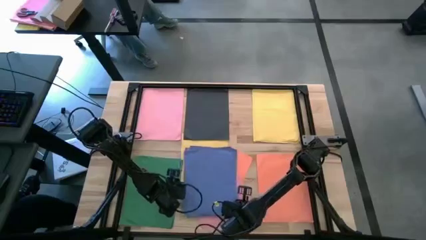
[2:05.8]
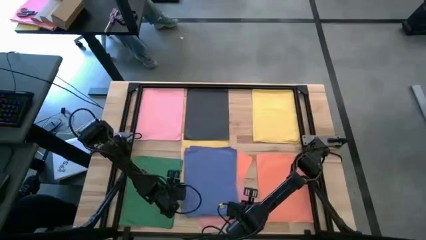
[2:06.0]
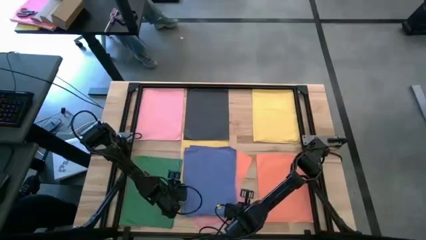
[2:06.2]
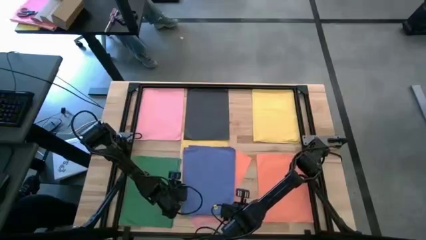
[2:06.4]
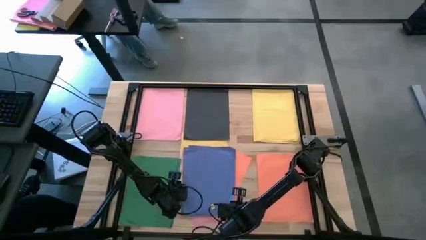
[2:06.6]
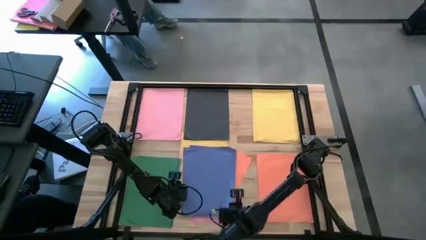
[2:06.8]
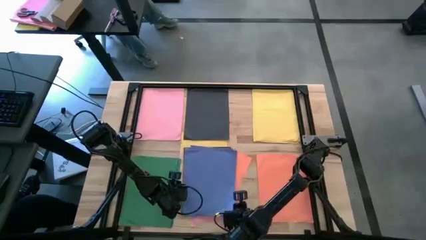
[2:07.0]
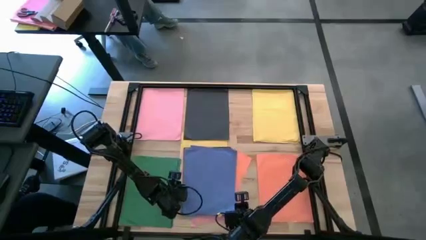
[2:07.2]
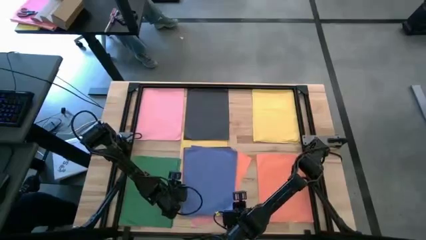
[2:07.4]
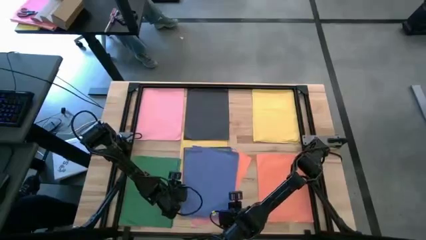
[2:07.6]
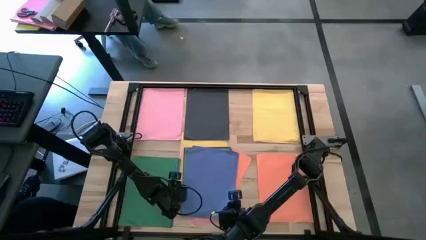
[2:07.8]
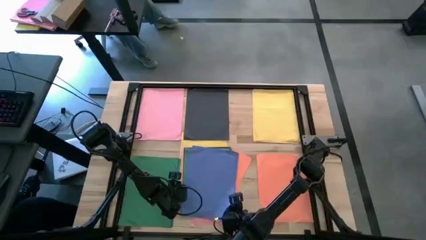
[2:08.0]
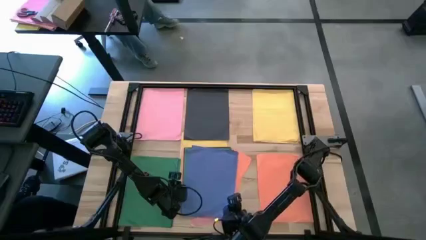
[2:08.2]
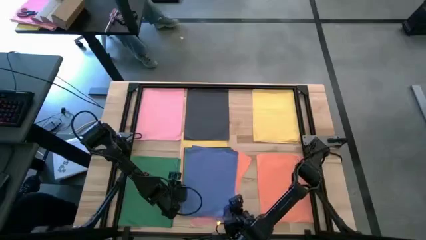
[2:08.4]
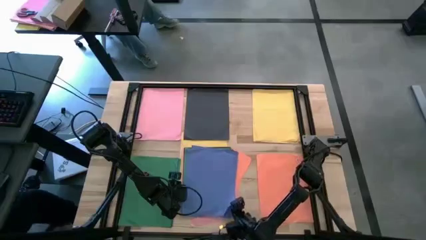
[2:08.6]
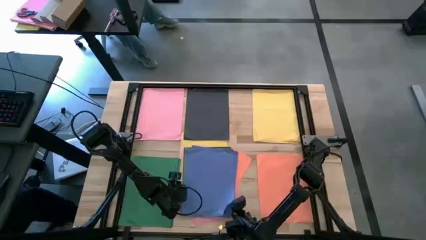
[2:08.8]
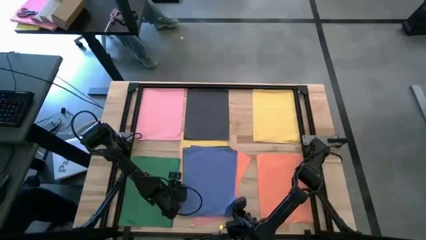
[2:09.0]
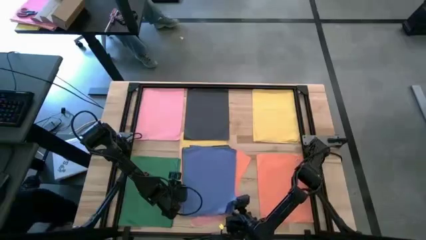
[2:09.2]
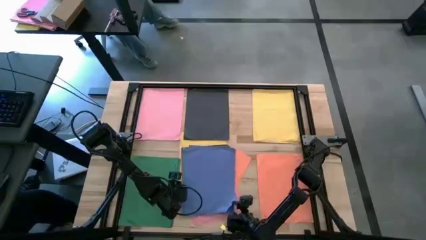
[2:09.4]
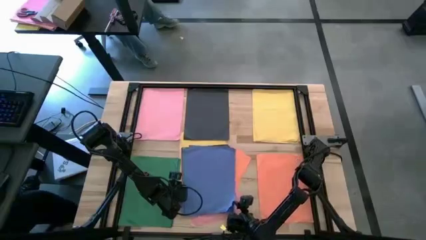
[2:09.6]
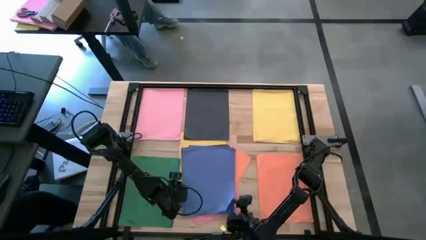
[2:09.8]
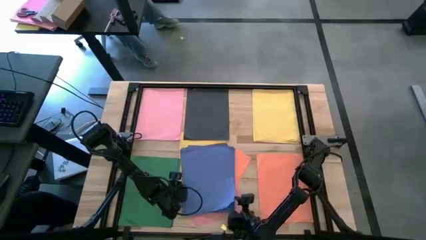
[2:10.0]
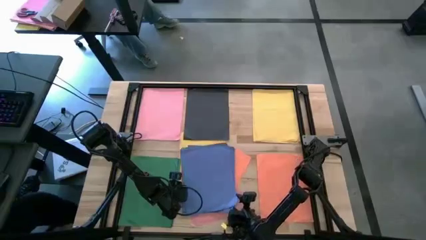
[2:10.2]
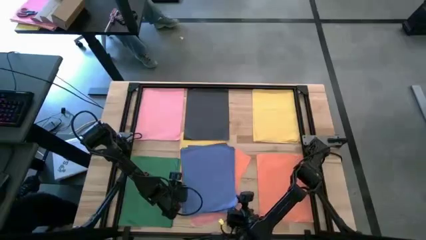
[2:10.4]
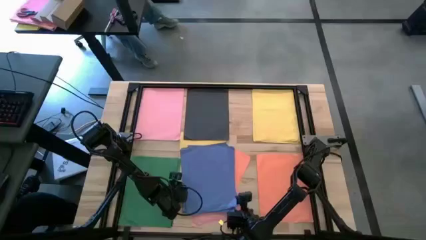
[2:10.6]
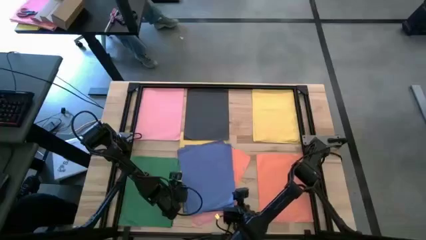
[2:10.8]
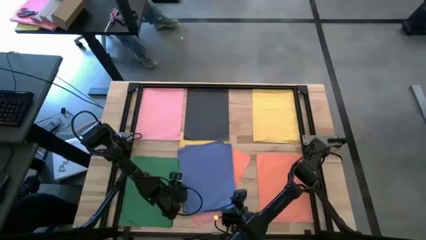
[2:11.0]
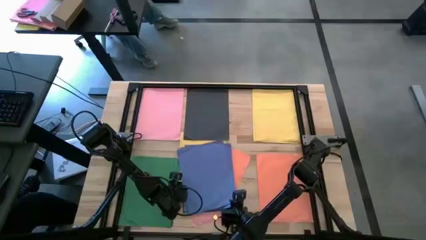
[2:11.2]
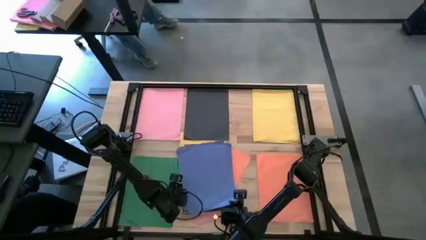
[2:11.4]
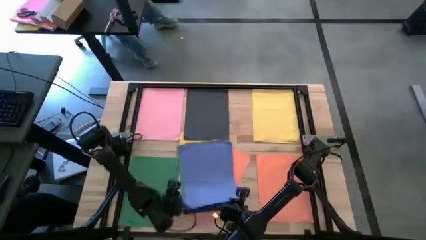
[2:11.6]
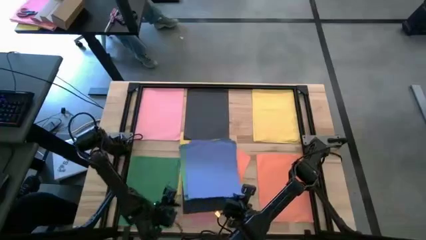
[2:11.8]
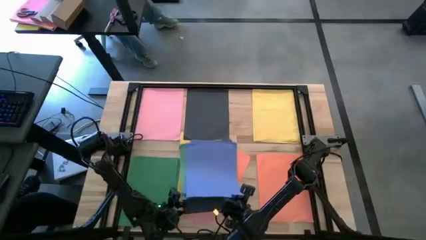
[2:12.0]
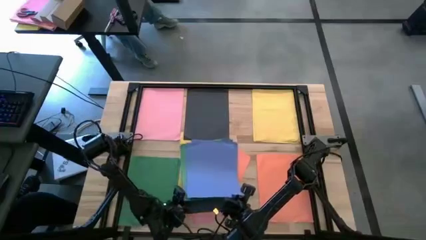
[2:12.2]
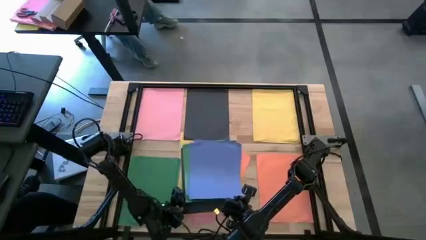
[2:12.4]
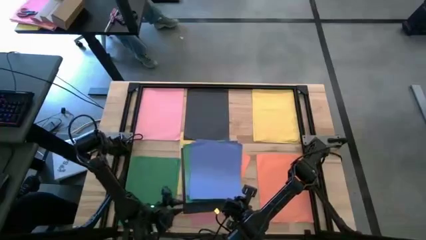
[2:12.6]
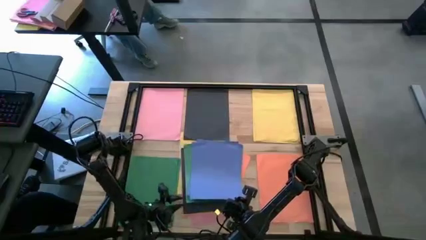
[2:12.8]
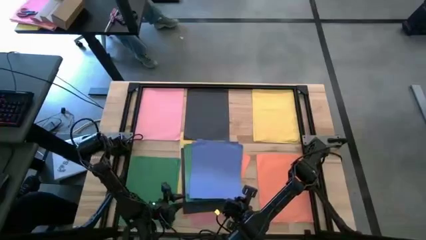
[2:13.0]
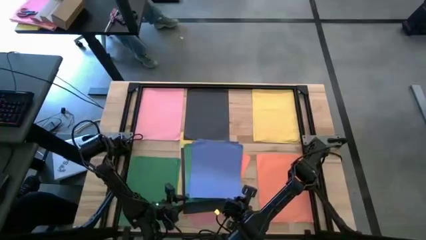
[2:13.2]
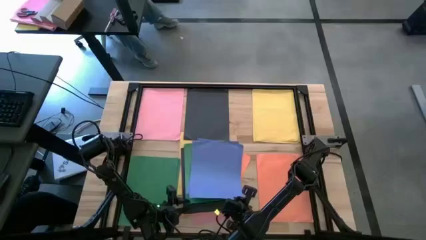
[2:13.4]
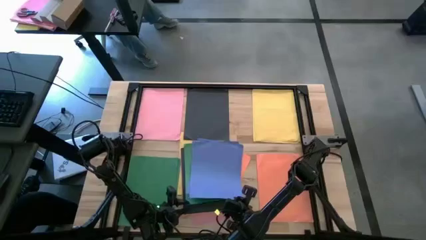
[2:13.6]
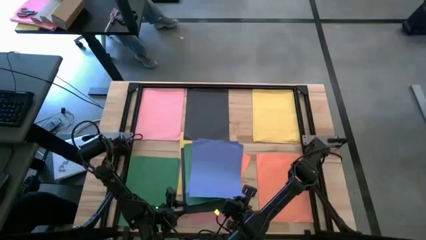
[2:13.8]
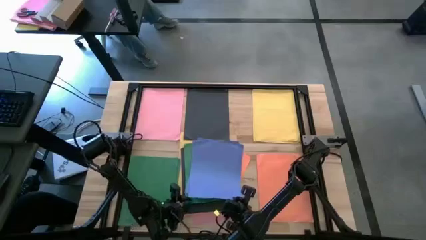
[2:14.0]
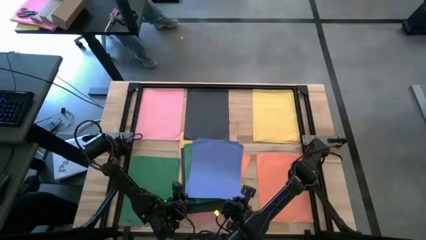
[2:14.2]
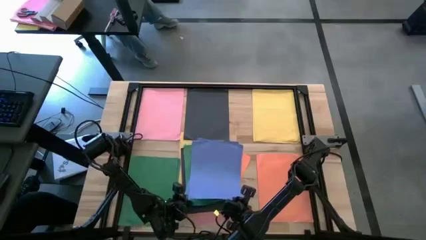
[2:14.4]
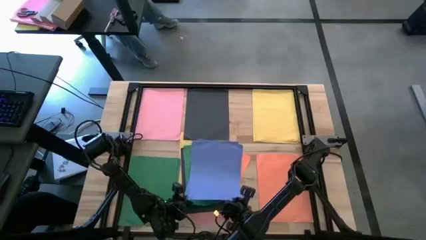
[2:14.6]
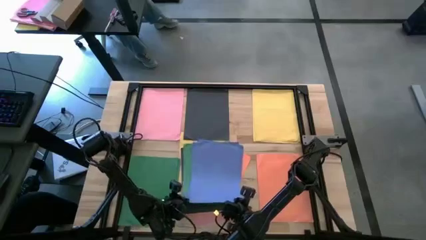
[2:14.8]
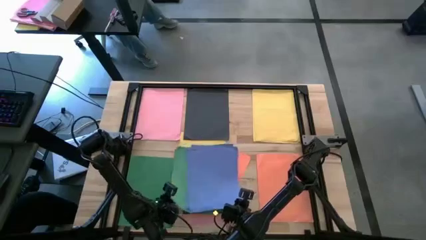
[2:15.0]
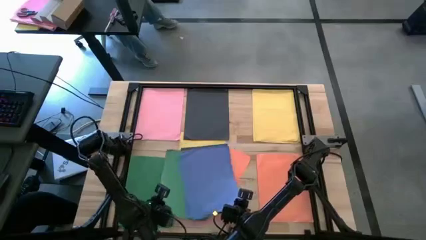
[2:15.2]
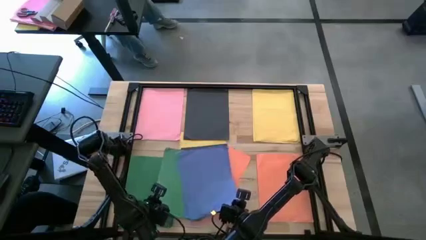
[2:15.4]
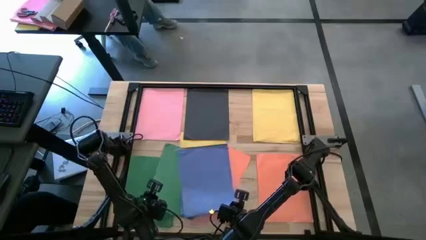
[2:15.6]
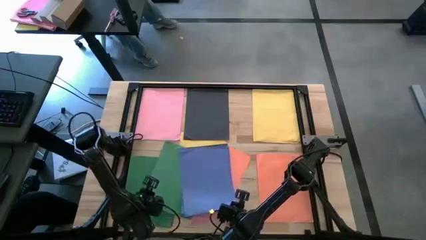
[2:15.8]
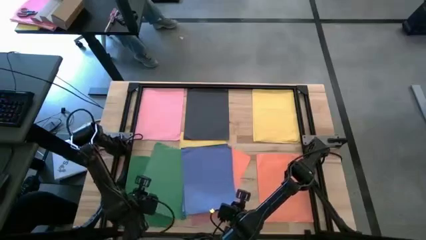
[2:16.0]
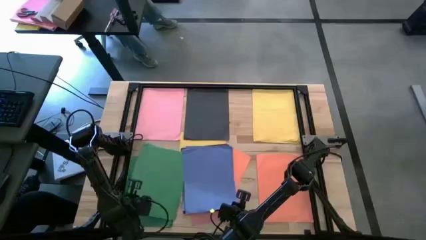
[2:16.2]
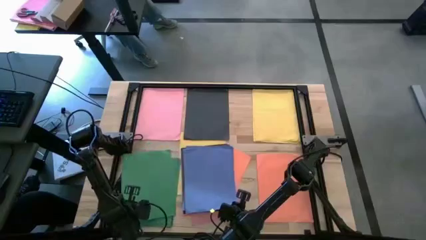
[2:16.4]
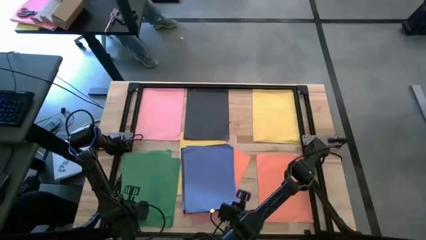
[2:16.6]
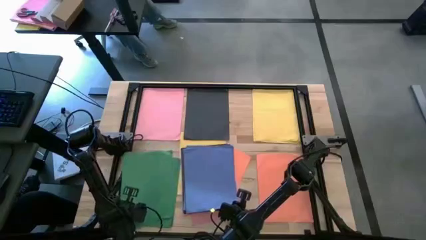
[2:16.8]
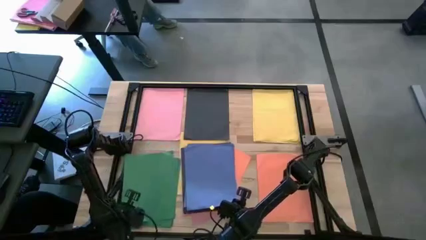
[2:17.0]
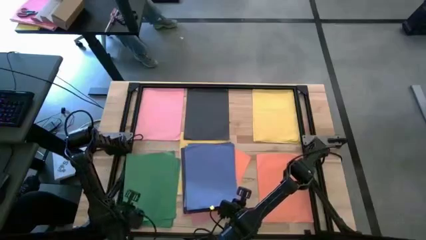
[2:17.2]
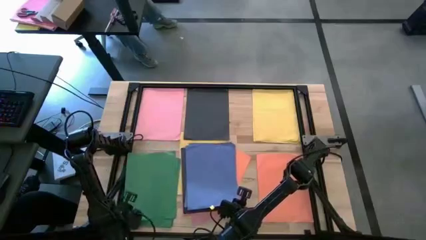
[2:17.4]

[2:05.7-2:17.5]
Task: Organize paper
Stack the green color paper on top of the other green color paper

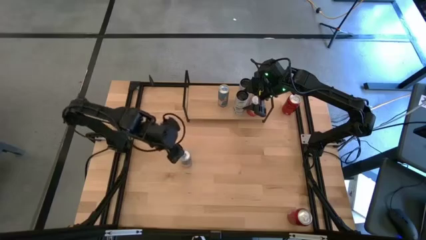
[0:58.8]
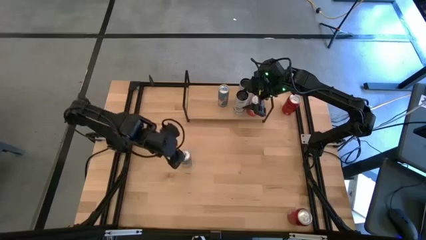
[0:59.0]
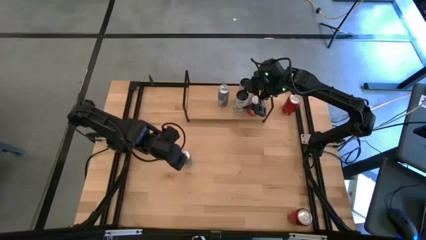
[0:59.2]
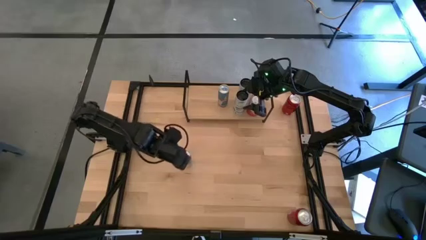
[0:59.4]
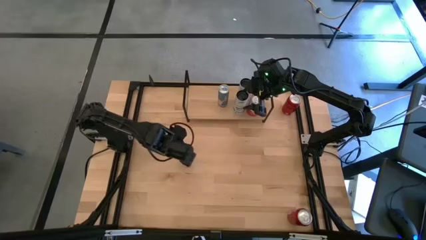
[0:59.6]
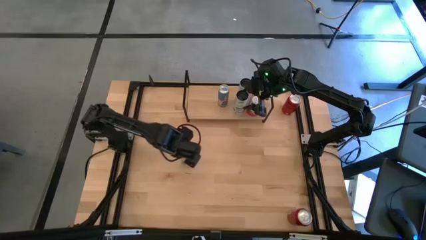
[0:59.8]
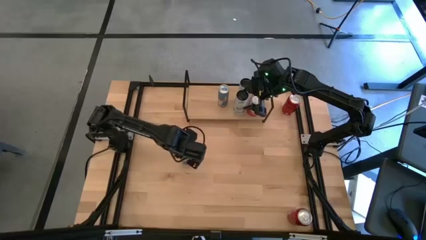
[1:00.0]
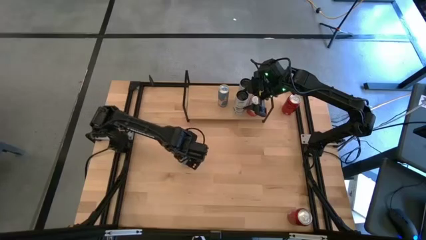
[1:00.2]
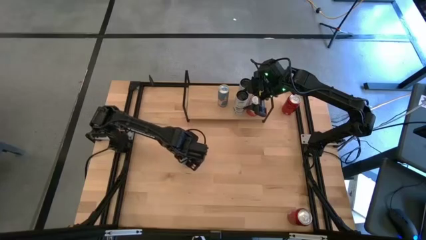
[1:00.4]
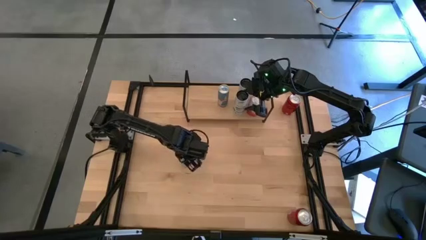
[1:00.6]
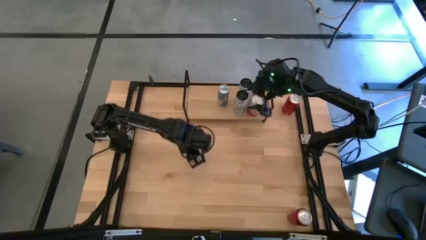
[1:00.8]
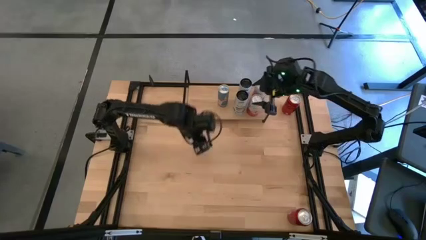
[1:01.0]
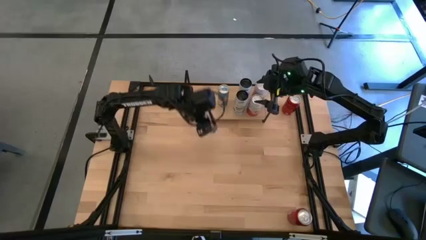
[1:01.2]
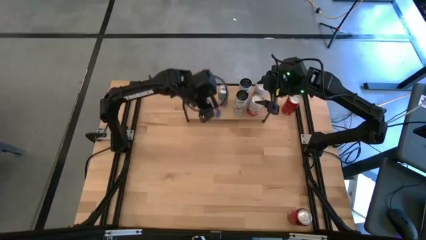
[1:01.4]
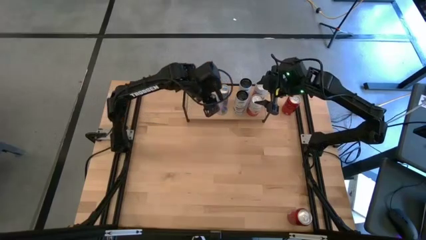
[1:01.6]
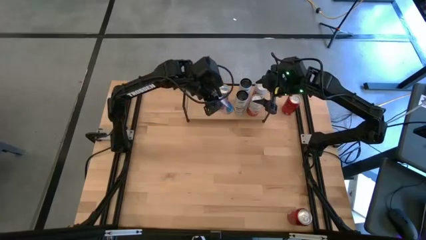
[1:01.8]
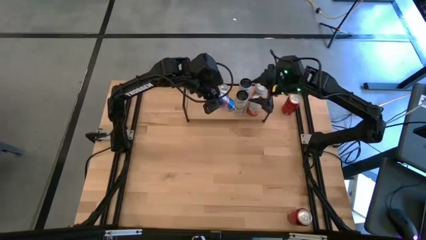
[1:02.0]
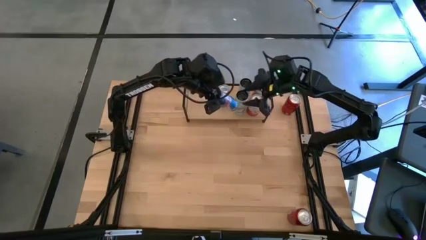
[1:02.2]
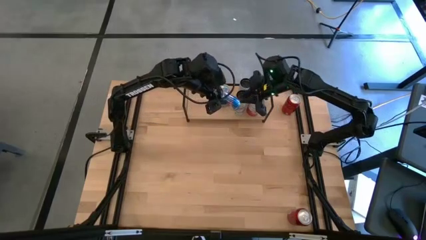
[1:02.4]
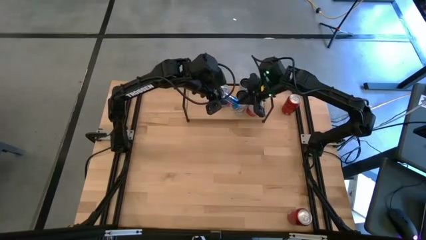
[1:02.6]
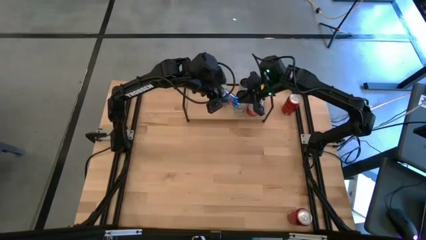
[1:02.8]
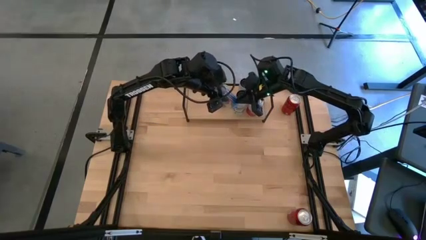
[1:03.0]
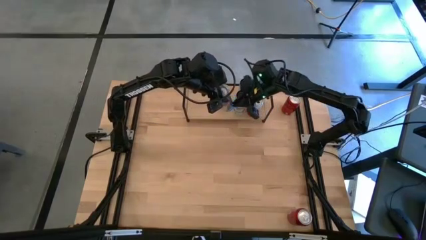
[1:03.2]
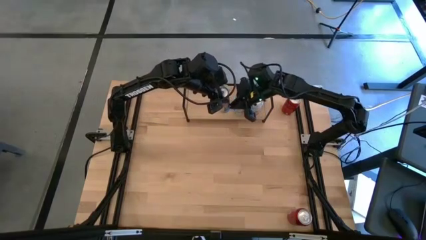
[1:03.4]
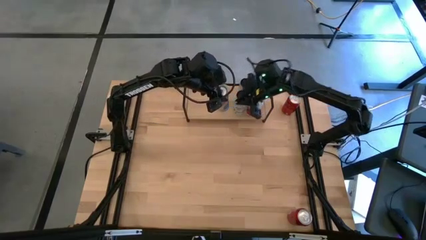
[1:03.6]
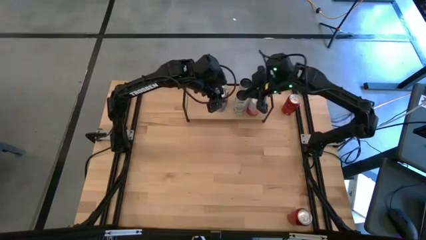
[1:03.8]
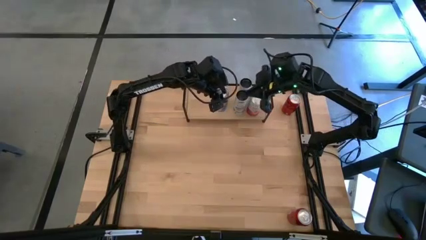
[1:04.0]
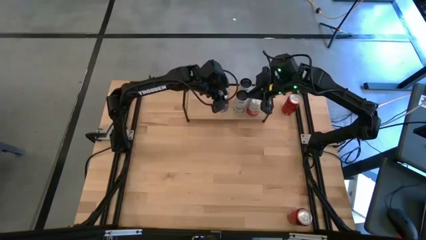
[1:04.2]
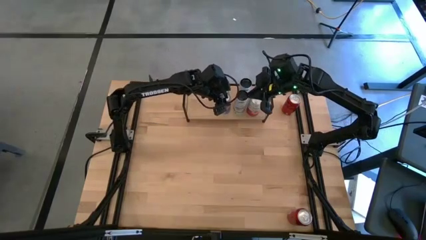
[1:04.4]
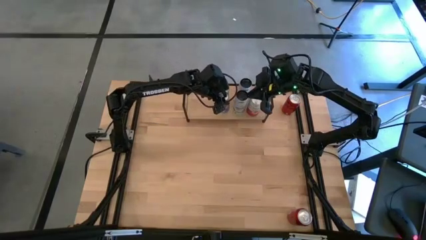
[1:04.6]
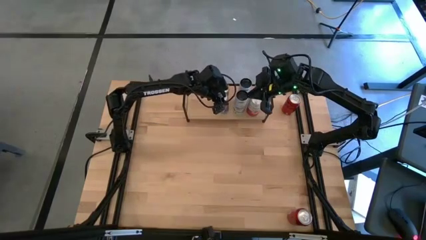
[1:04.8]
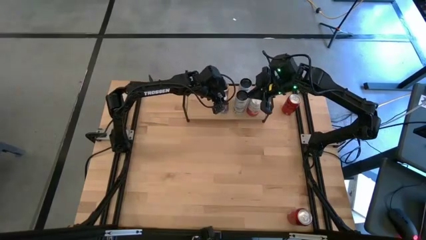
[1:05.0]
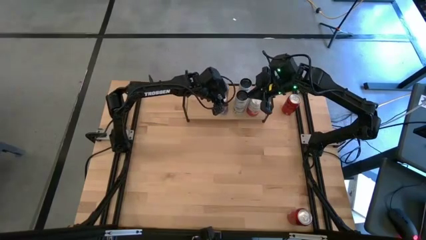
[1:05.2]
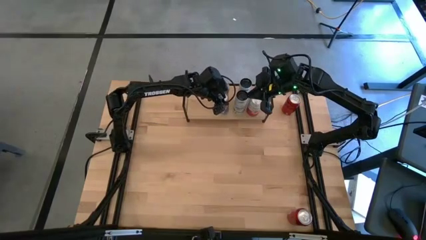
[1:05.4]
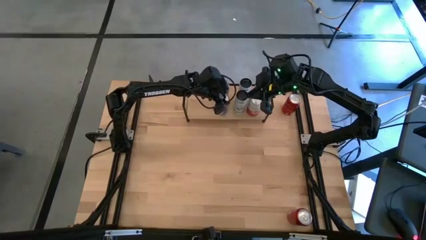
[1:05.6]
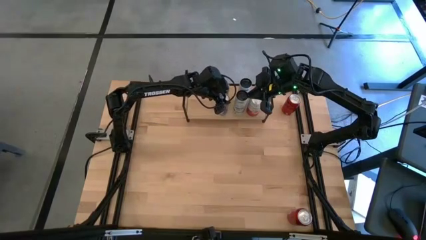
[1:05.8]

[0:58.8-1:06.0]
Task: Place canned beverage on shelf
Align the blue soda can with the other blue soda can on the shelf
